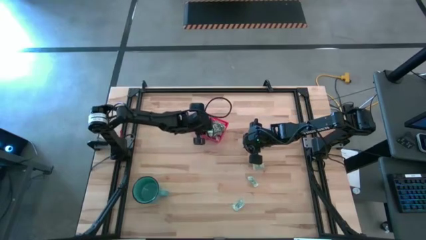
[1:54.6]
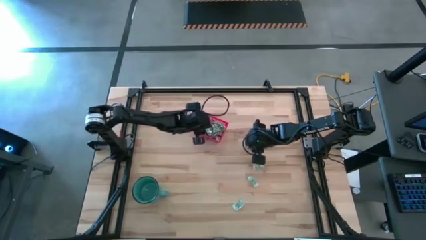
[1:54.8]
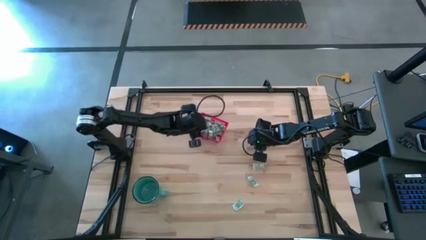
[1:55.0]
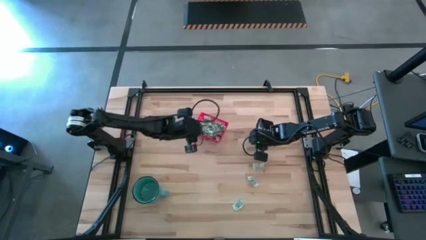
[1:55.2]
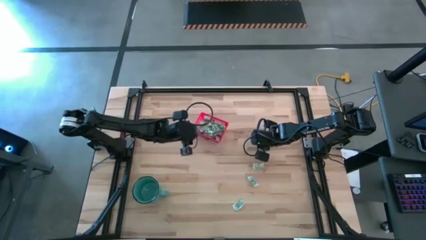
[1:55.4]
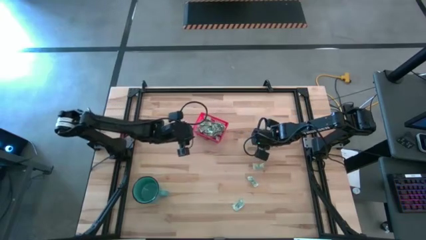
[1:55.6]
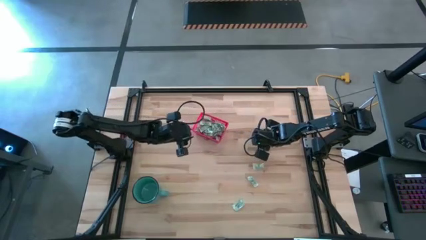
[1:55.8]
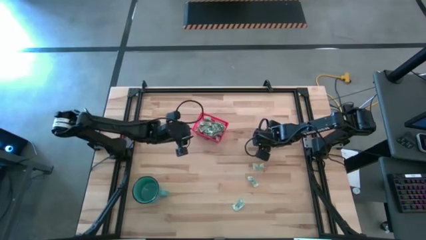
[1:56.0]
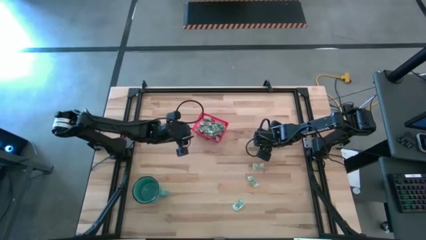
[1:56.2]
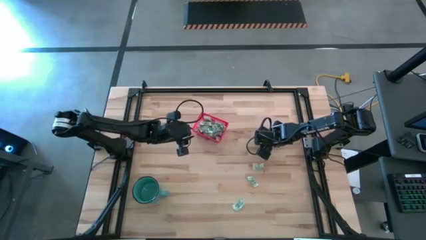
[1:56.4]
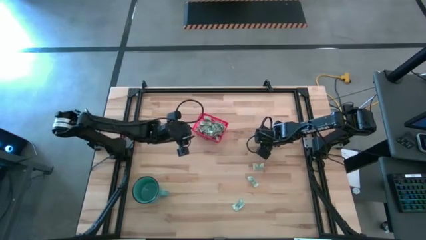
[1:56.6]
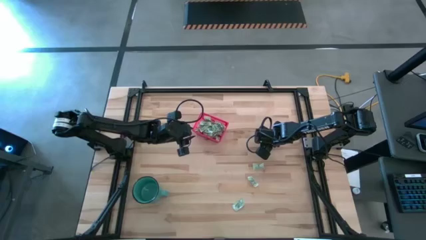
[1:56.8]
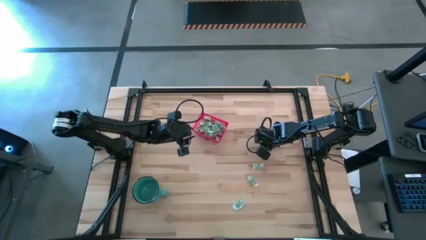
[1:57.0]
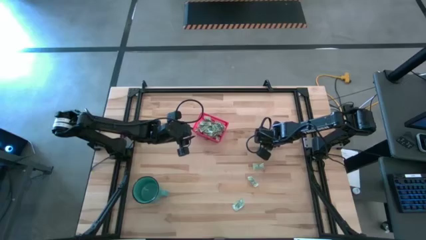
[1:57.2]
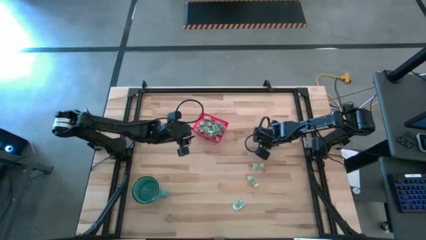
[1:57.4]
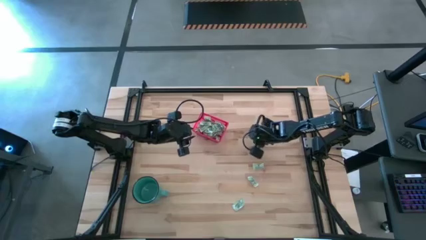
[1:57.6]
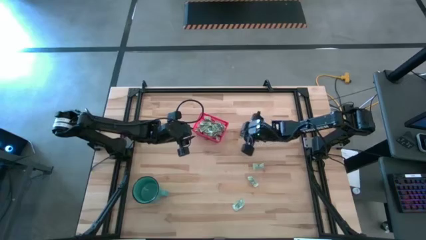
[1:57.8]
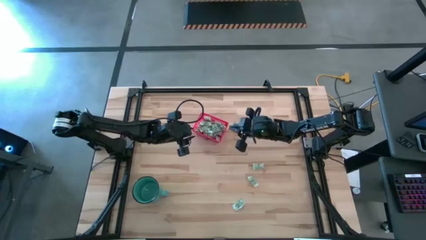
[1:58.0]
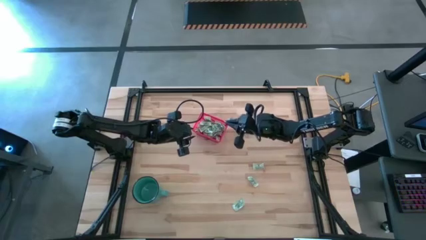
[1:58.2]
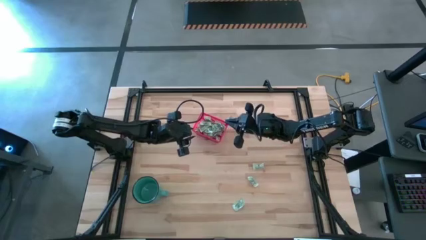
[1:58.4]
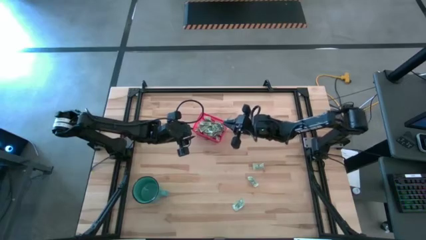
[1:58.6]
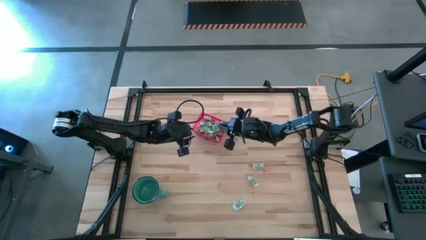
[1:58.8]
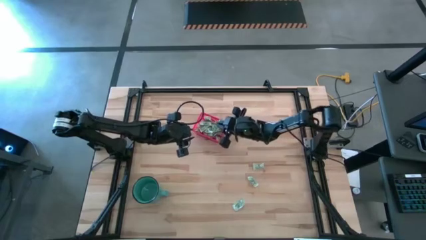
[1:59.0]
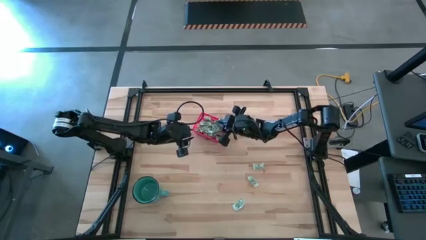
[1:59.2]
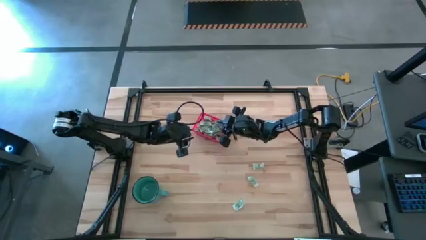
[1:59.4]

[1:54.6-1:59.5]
Task: Pick and place items into bin
Put the stevia packet into the red bin

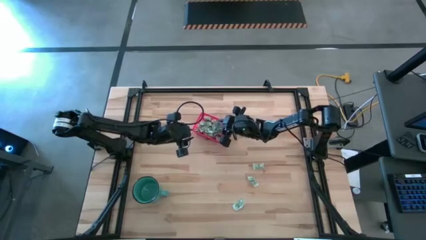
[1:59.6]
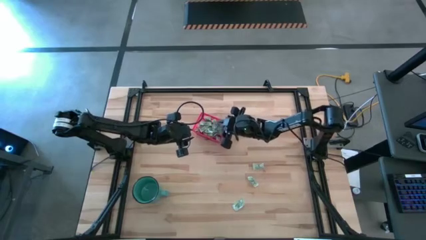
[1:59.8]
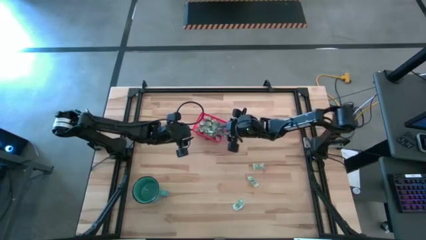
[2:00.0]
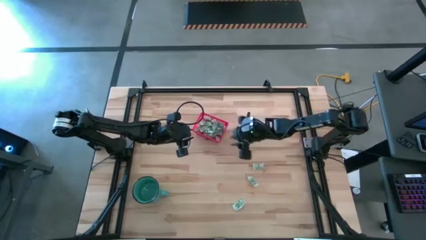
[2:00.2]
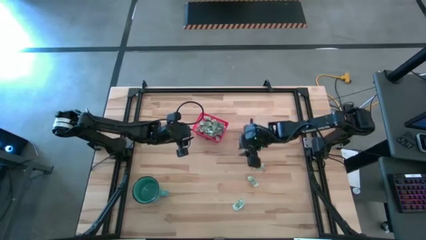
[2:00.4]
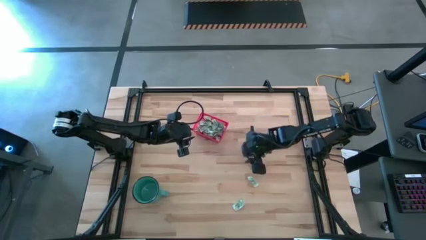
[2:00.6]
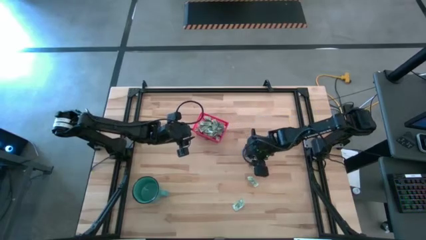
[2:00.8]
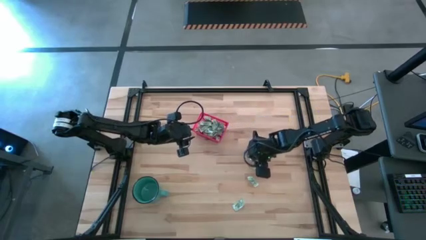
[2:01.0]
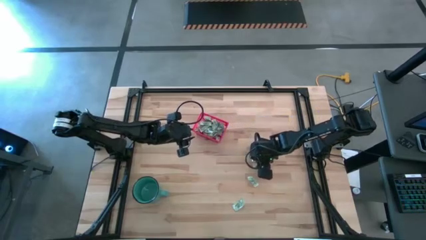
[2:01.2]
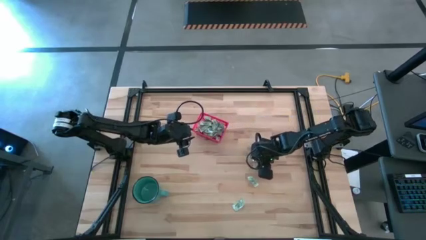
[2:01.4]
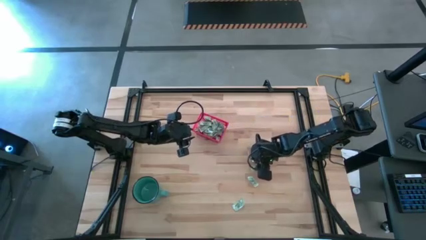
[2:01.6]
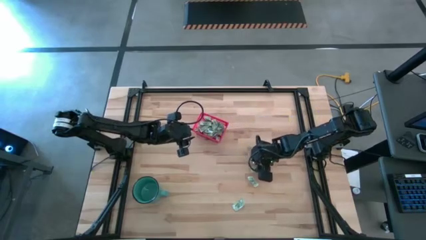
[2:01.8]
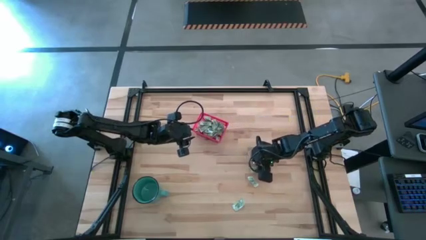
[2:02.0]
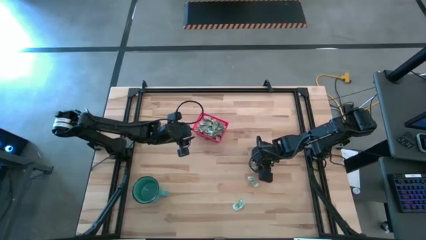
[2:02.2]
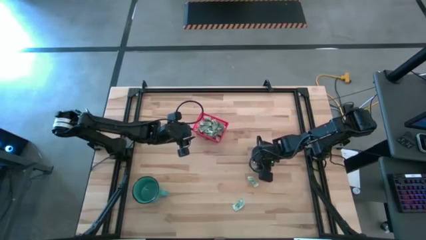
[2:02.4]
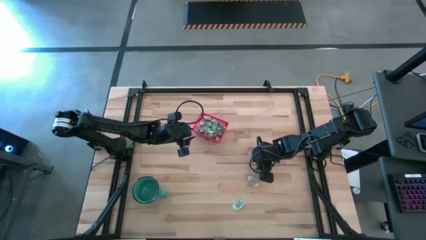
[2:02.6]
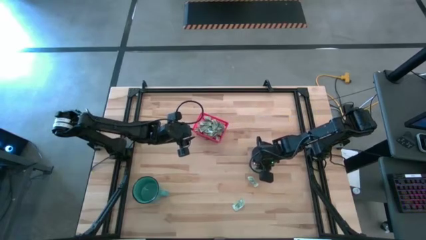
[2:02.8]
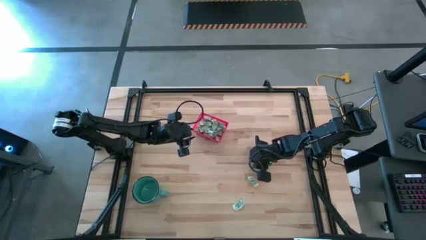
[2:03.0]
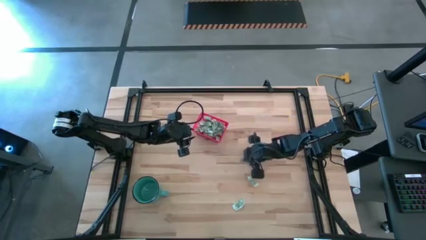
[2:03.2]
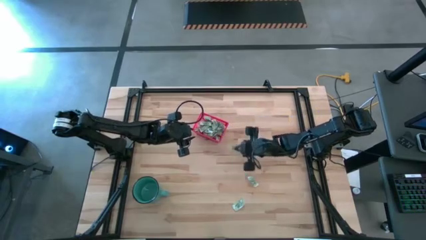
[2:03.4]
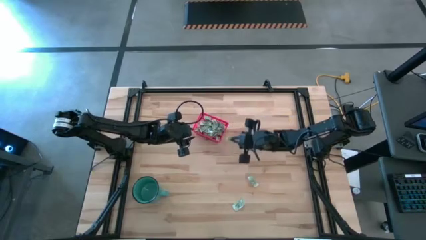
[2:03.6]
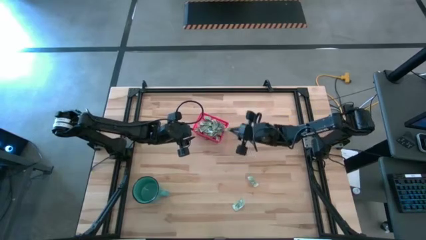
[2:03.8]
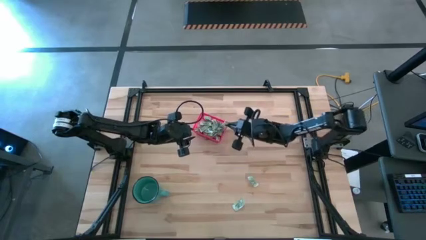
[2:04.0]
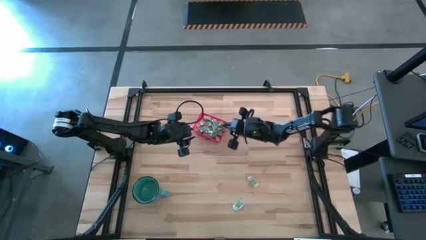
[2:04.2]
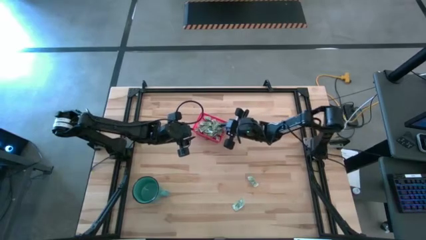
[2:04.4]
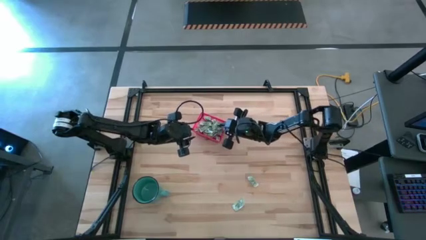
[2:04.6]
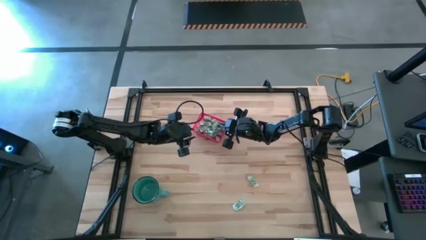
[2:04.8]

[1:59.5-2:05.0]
Put the stevia packet into the red bin

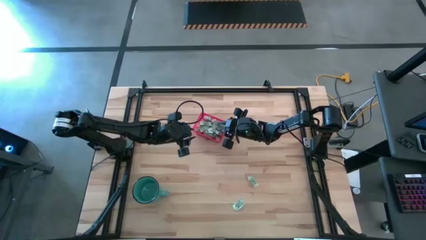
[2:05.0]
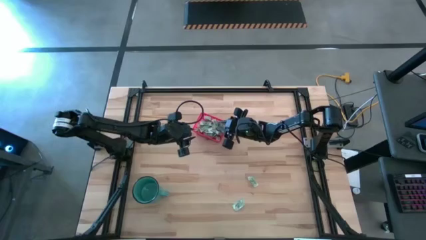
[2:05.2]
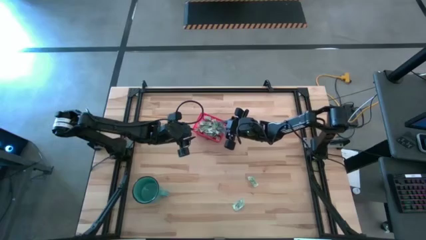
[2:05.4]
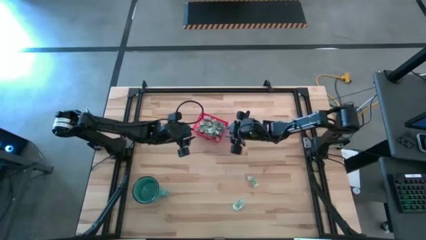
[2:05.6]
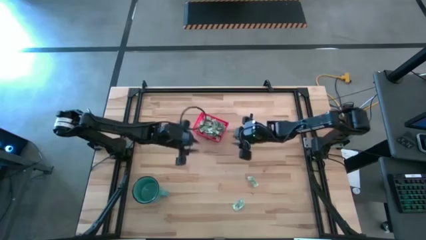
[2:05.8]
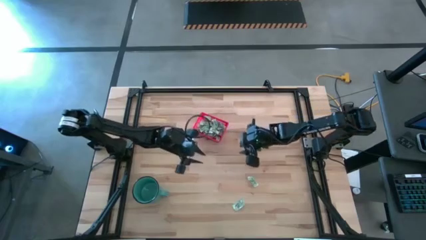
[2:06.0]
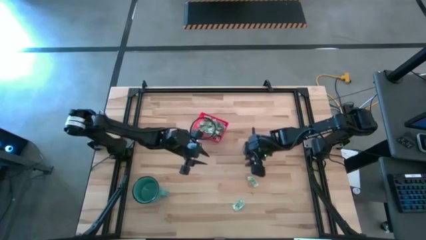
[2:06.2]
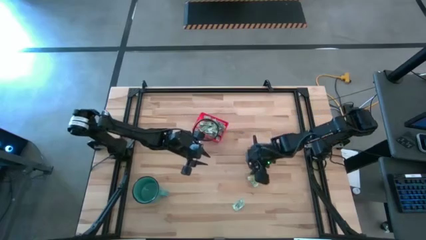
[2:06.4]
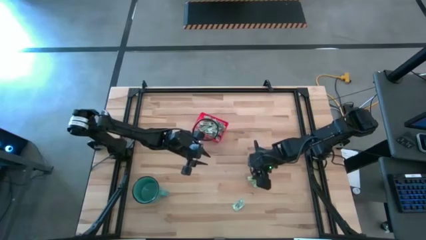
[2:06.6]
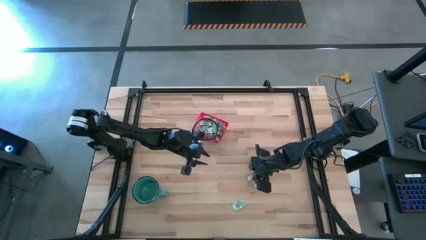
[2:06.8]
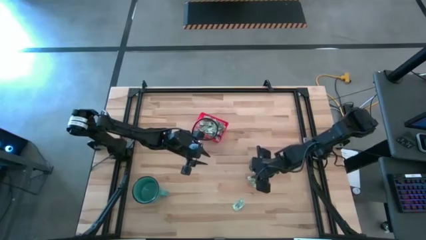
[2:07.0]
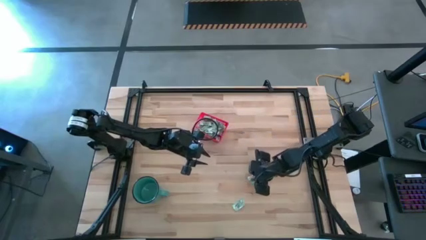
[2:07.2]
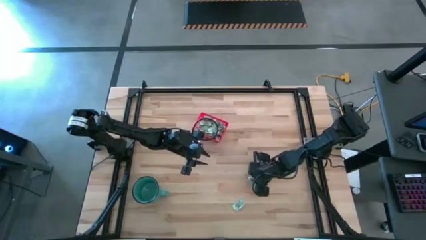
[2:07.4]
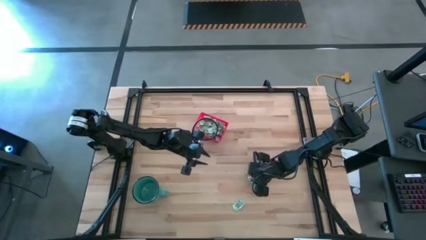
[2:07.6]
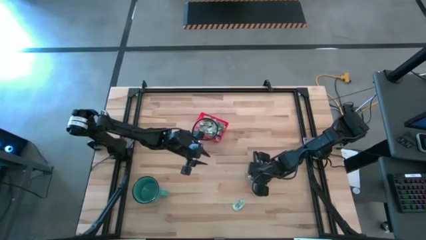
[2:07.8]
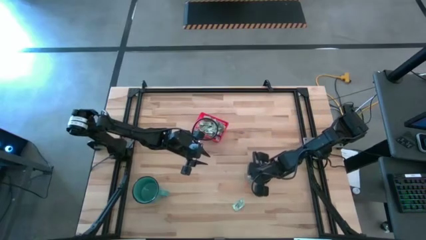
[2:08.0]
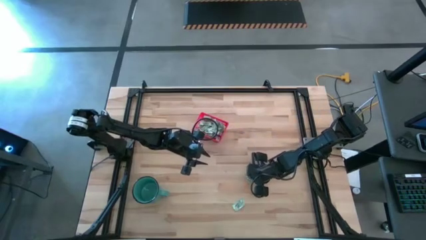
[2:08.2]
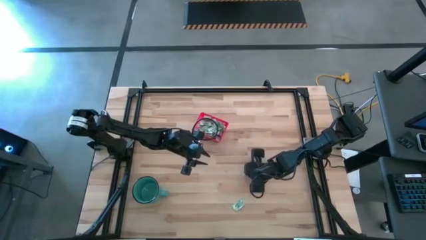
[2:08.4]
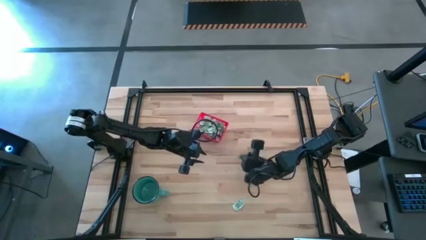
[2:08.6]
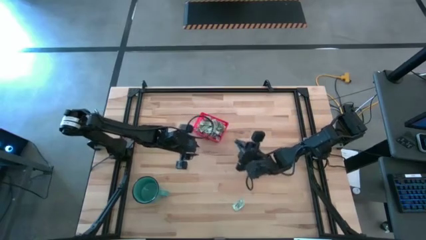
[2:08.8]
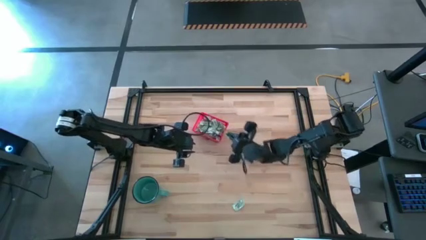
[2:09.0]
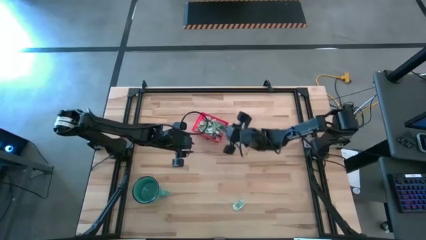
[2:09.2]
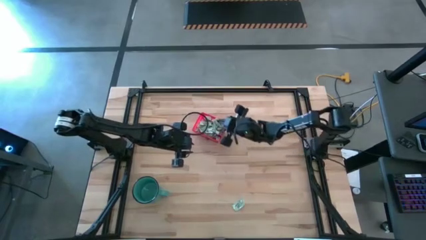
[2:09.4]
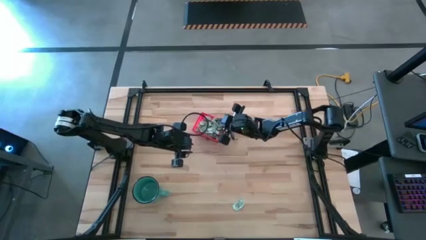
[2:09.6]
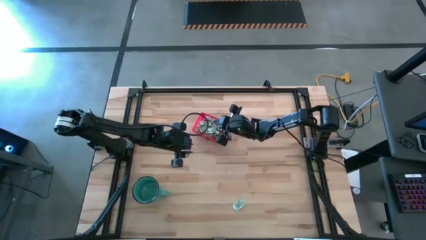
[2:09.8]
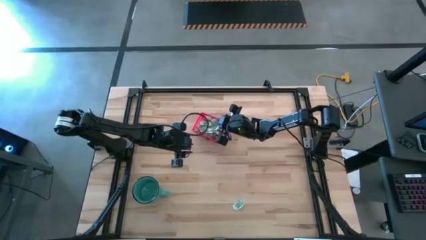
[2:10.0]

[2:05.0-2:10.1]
Put the stevia packet into the red bin

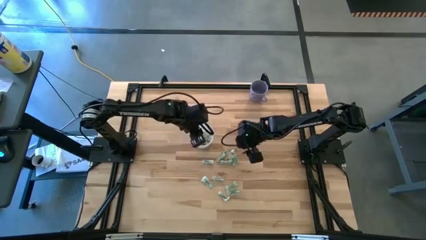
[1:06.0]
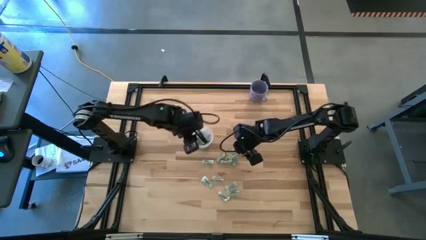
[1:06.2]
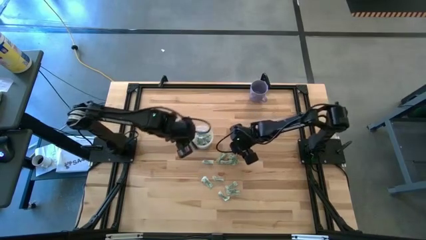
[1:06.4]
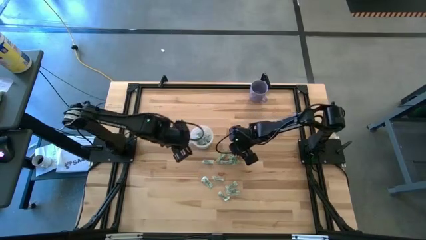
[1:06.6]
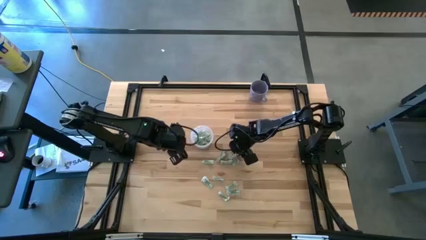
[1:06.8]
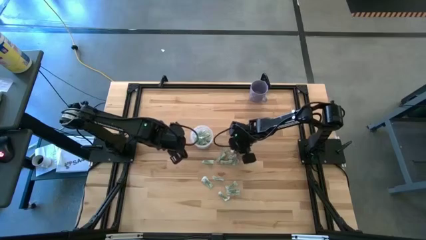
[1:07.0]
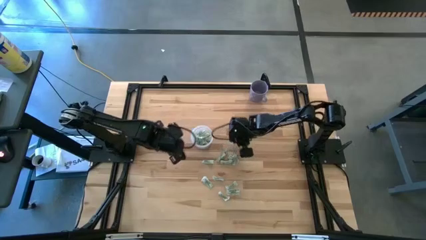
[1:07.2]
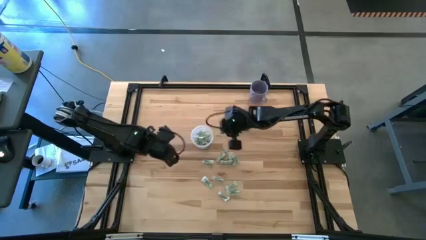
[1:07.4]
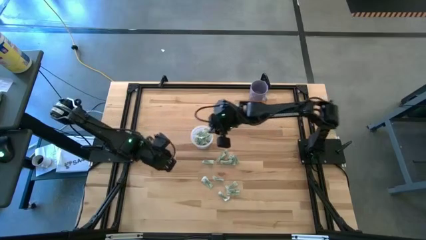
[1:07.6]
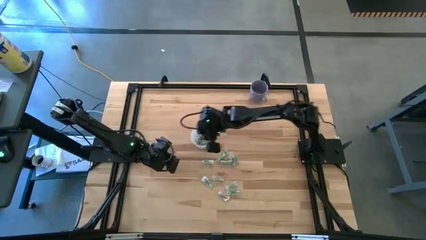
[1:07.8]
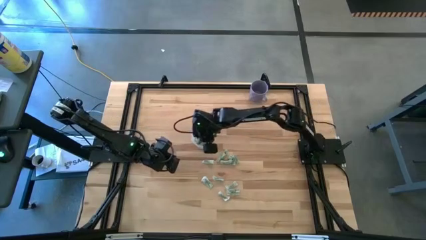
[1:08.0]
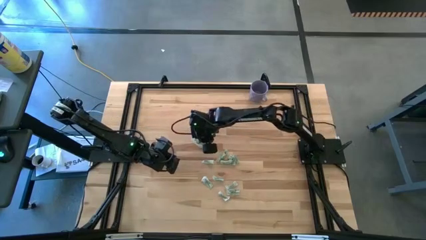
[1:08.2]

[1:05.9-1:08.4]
Task: Pick and place Stevia / Truvia into bins
Put the white stevia packet into the transparent container
